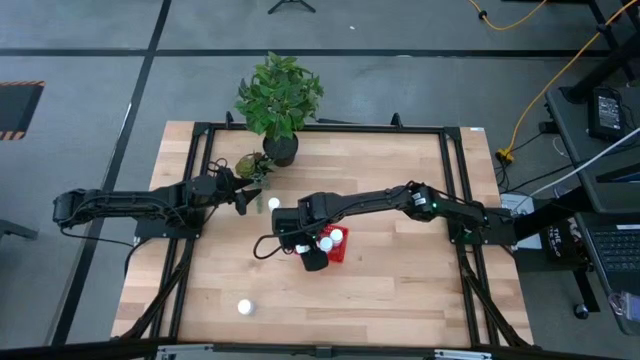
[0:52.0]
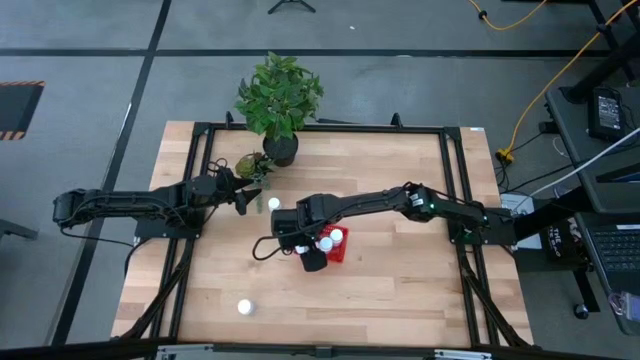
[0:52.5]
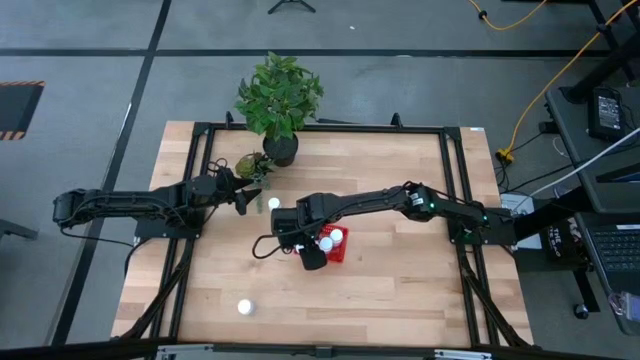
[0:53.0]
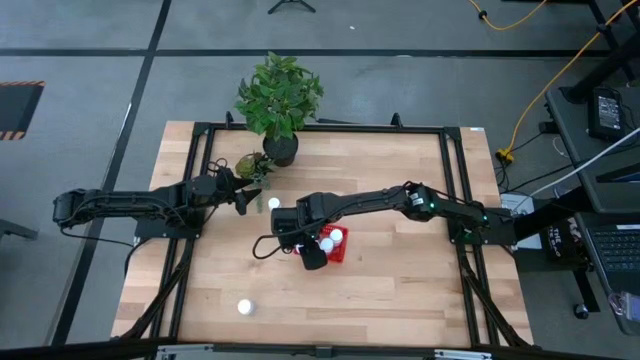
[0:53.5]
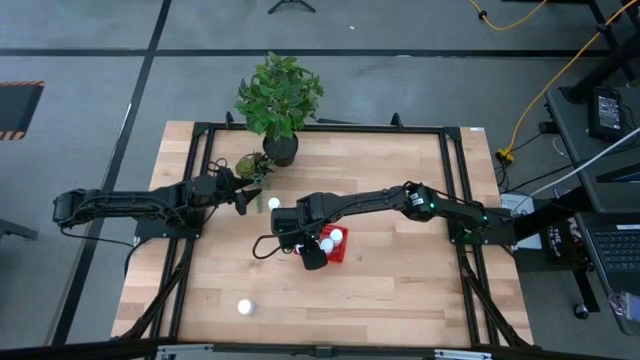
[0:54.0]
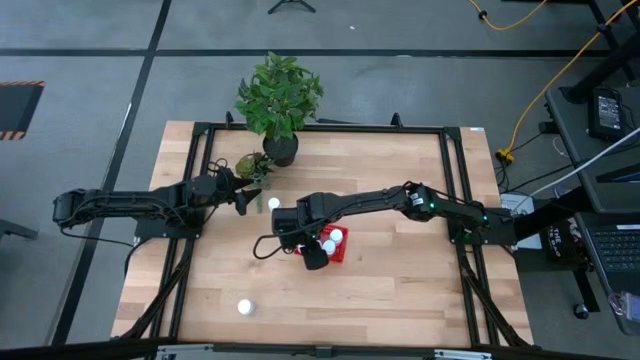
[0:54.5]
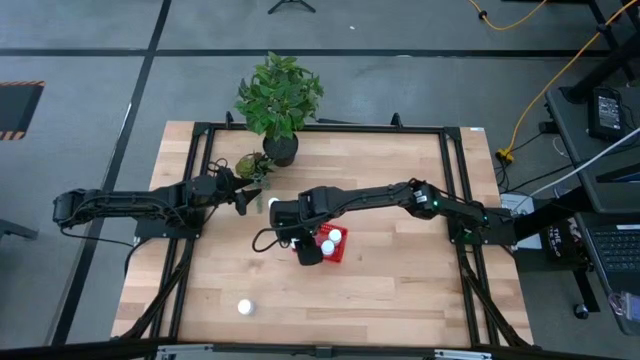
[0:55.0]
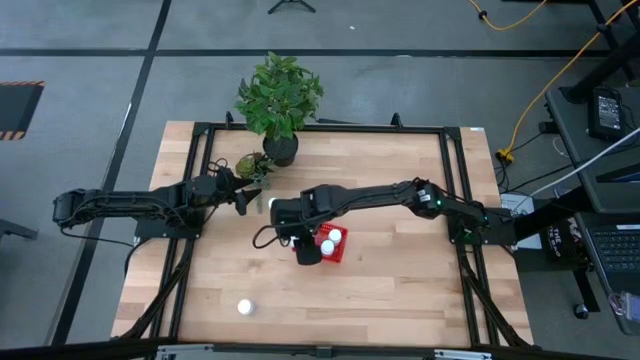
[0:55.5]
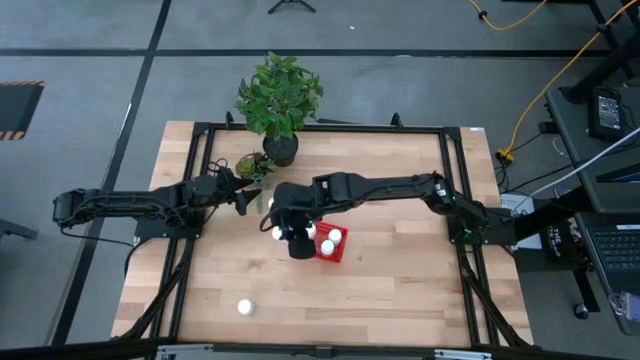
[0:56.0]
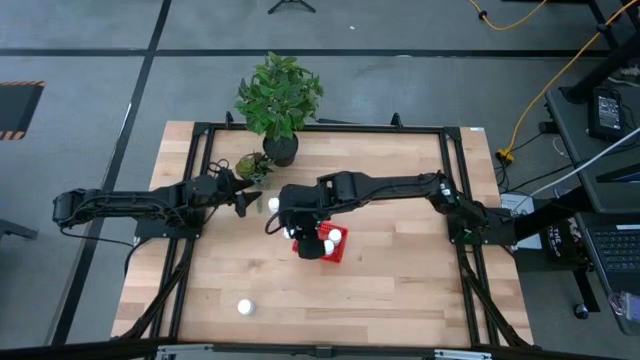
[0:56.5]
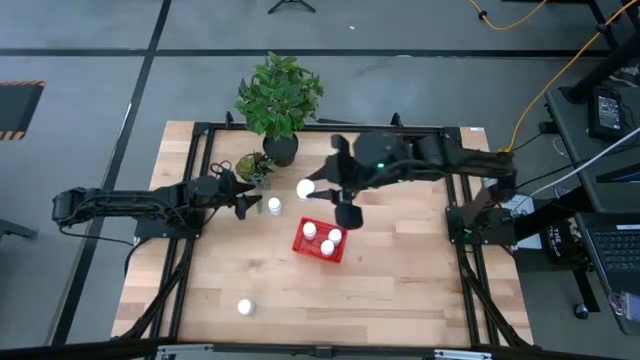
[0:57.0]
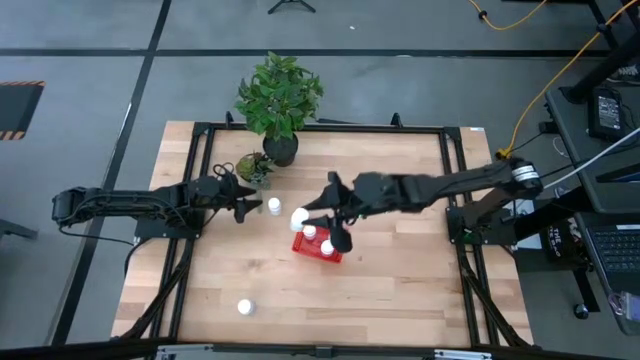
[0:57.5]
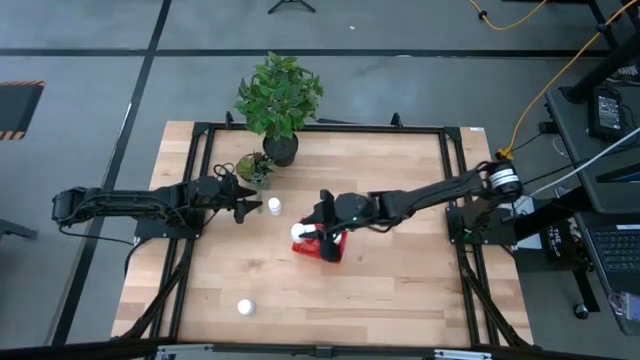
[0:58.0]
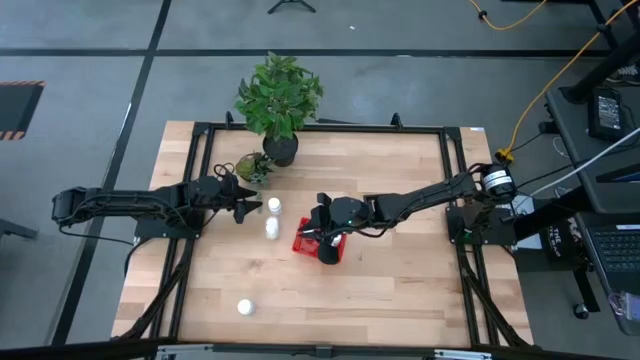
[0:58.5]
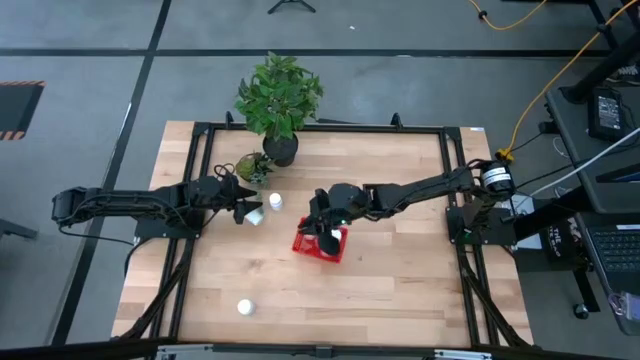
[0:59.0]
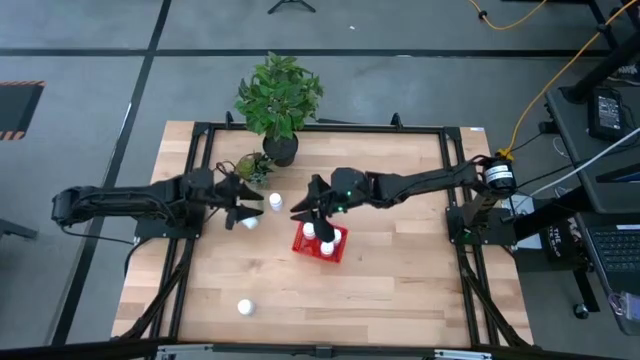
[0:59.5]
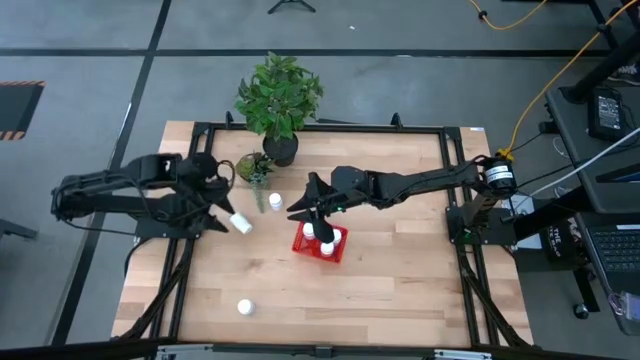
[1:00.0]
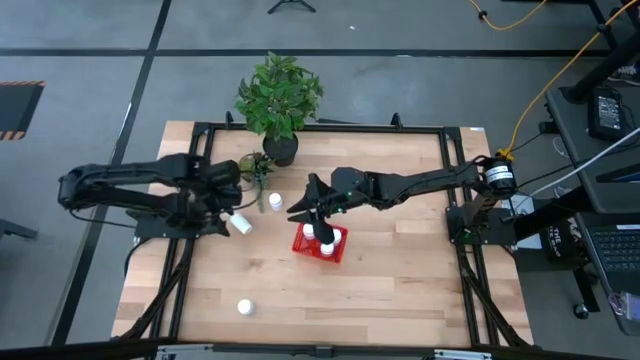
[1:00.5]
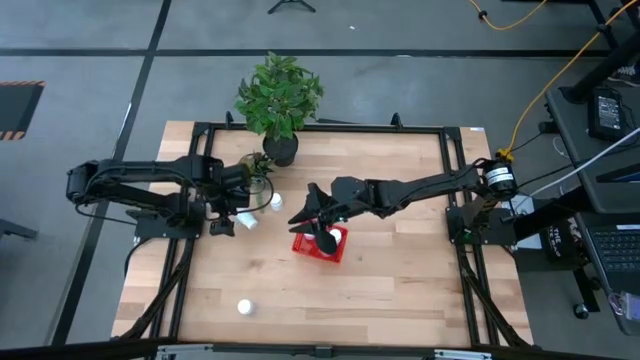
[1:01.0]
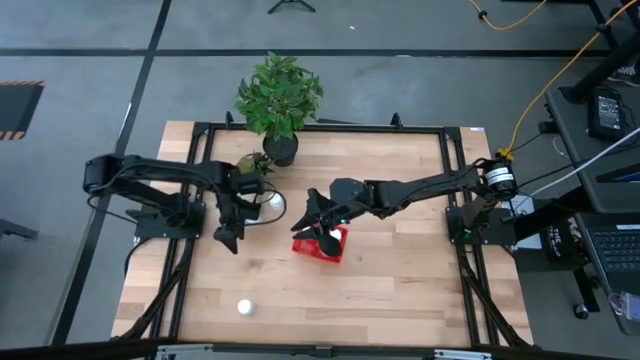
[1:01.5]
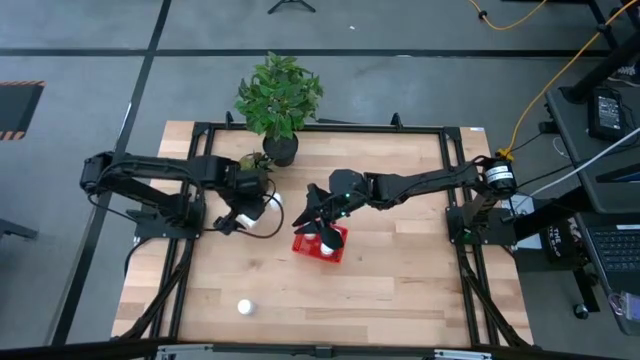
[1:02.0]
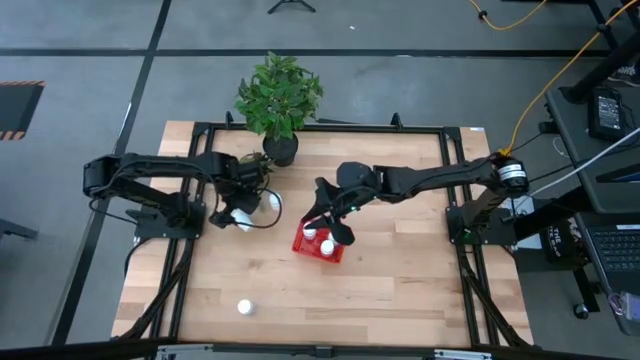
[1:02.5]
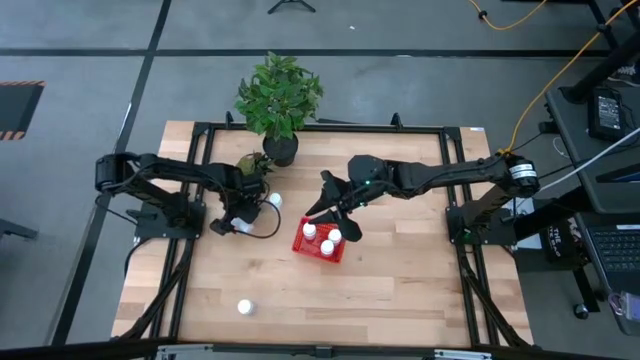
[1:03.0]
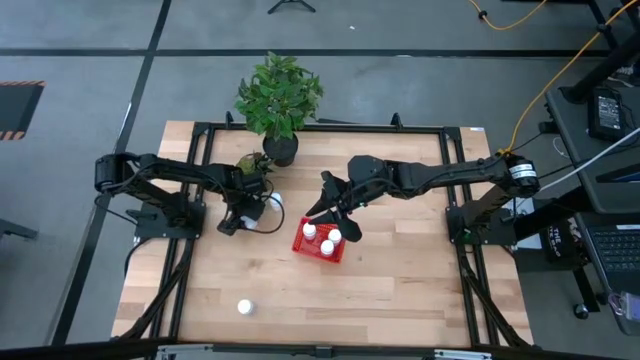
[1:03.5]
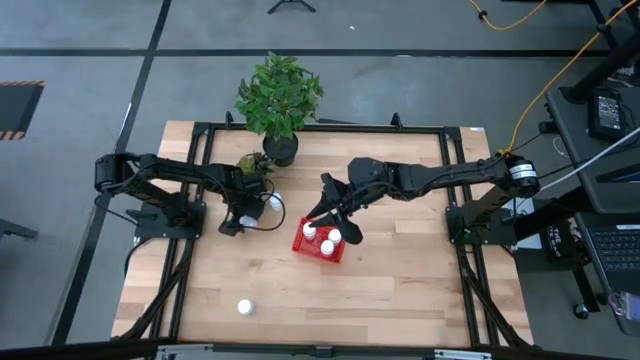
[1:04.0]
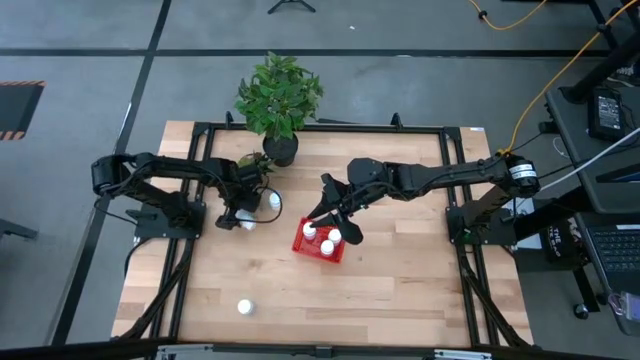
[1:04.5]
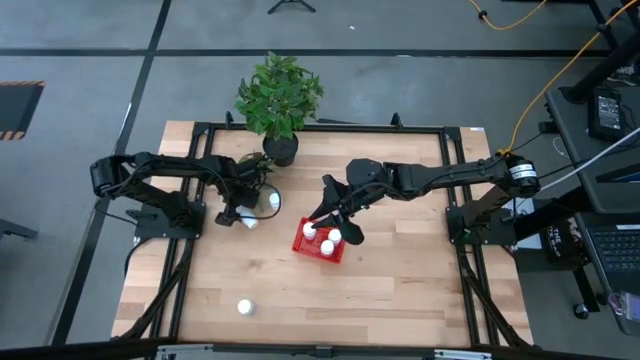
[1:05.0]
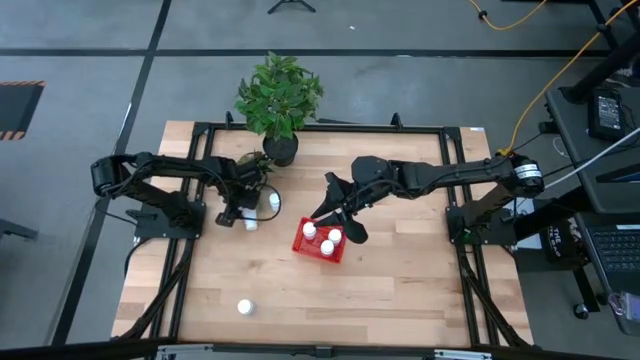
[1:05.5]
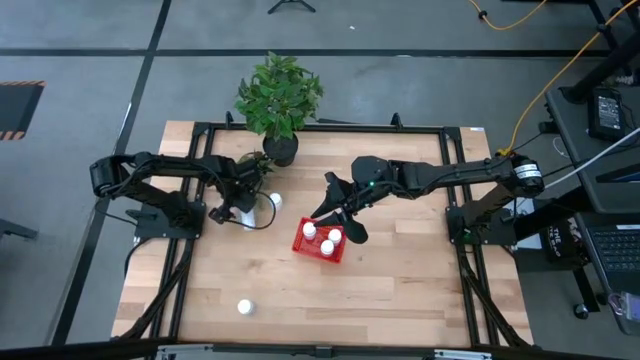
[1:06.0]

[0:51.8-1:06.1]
Task: Pick and place pill bottles into a basket
Put the white pill bottle into the bin

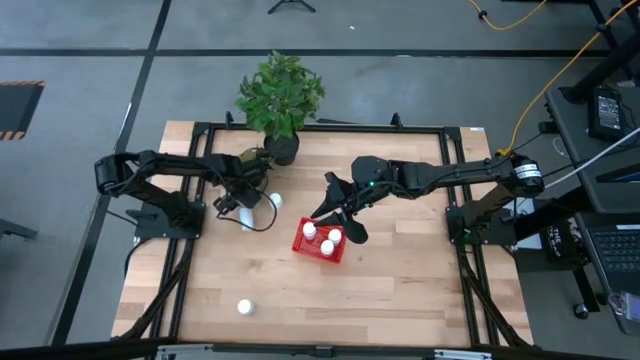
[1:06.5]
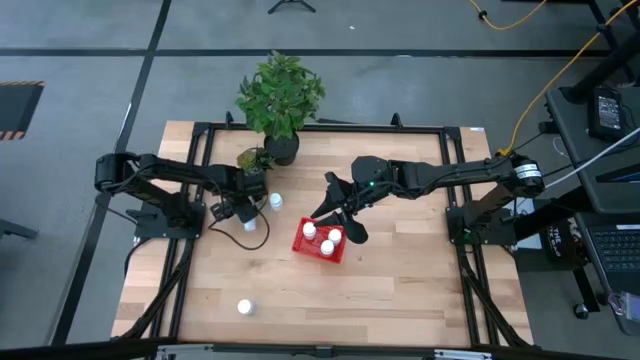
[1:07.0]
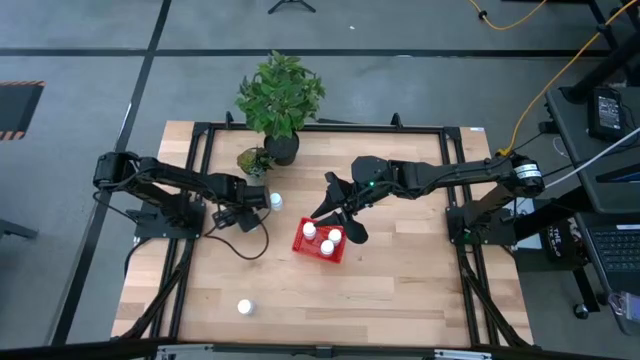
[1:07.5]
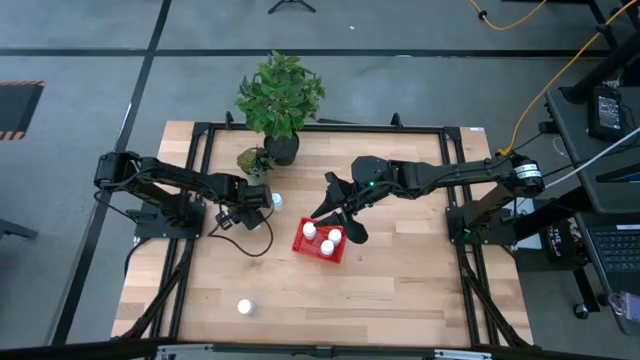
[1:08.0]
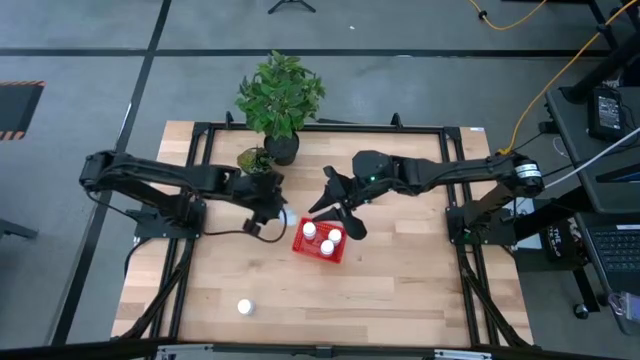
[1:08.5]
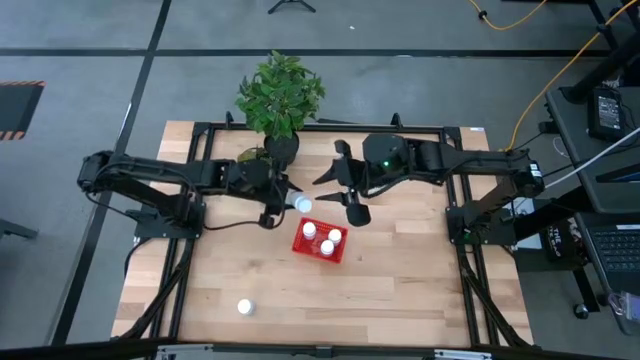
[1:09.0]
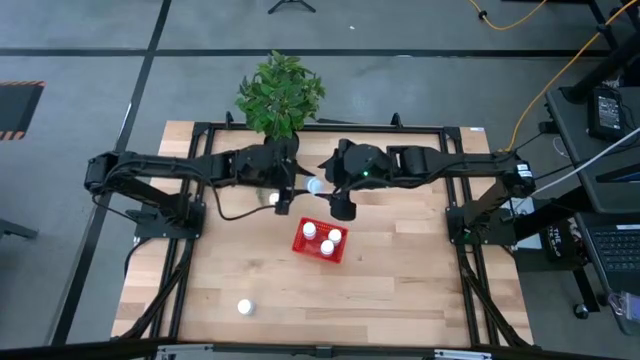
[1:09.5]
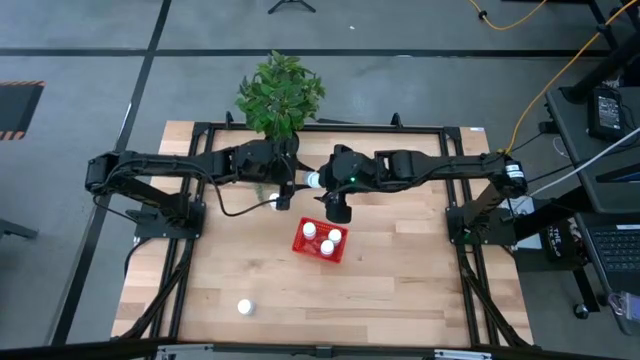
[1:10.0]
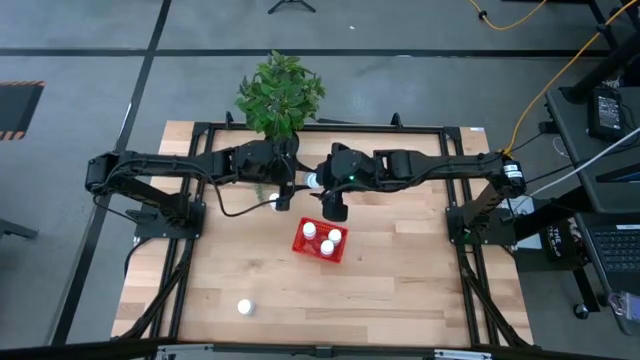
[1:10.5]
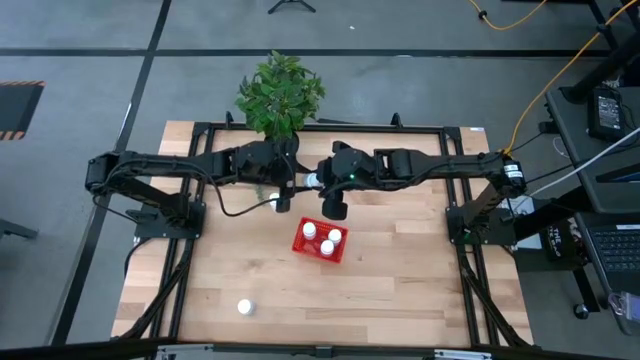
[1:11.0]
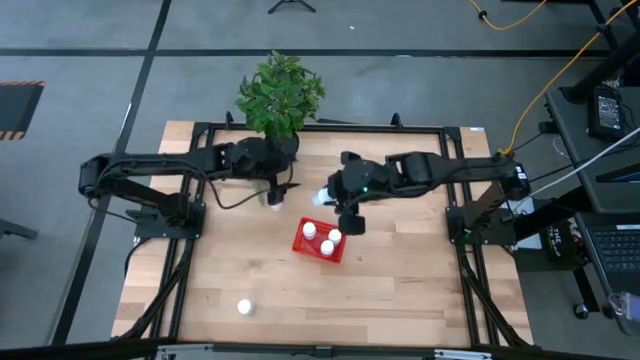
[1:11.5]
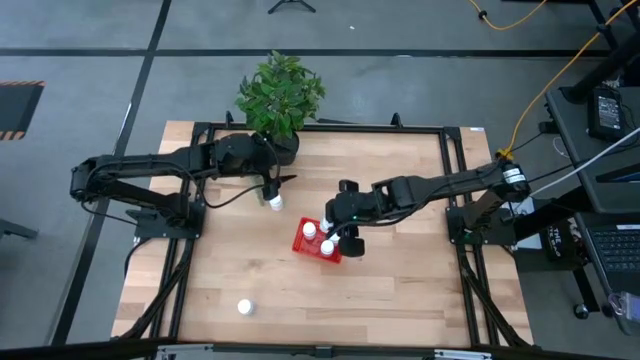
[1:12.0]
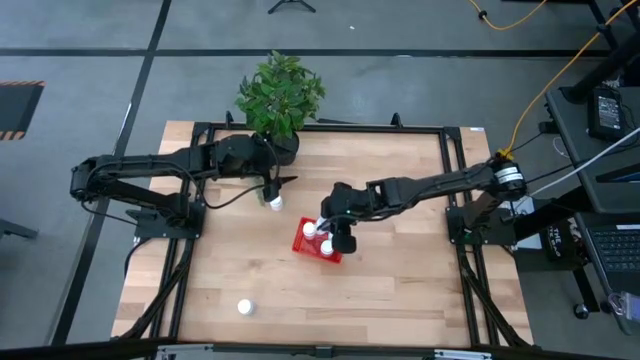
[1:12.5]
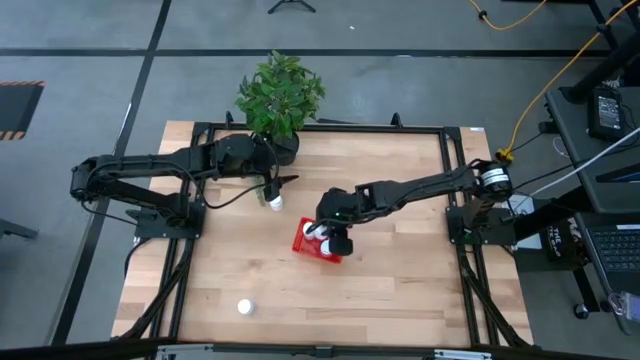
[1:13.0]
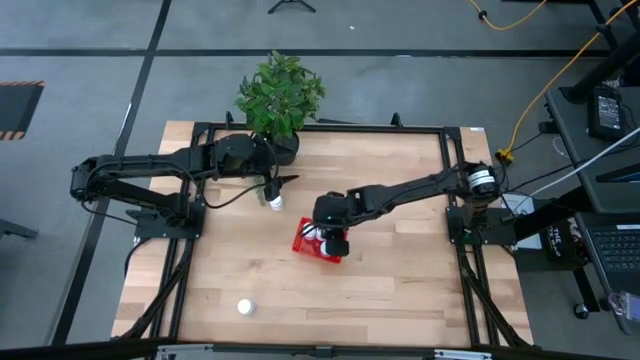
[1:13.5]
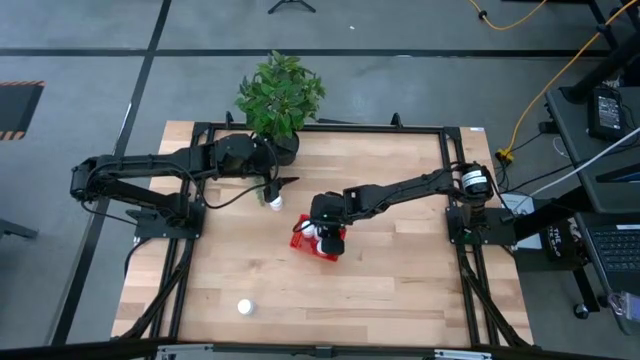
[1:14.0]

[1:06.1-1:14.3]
Put the white pill bottle into the bin
